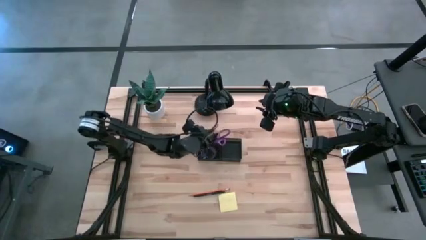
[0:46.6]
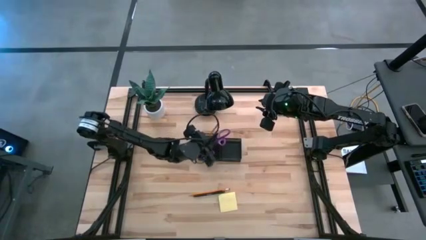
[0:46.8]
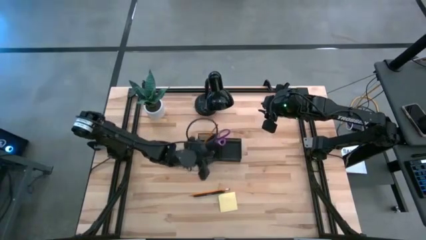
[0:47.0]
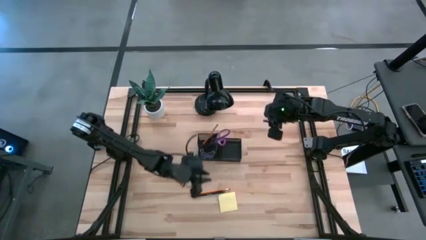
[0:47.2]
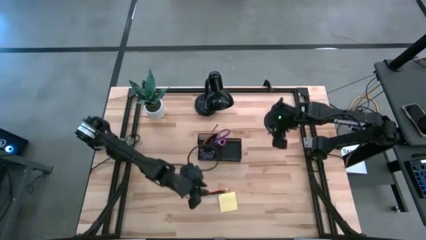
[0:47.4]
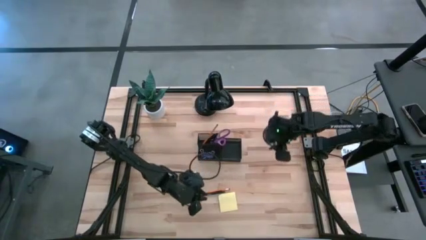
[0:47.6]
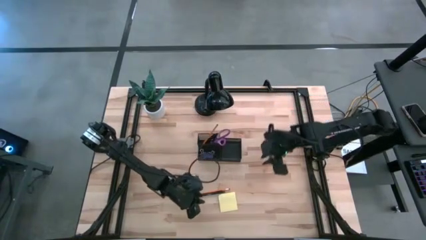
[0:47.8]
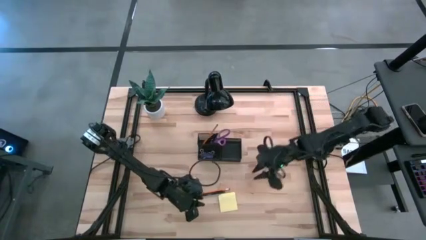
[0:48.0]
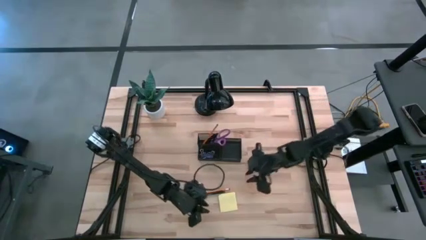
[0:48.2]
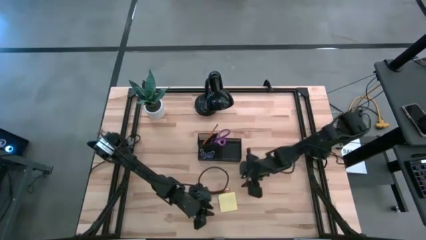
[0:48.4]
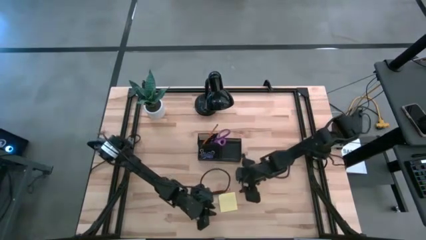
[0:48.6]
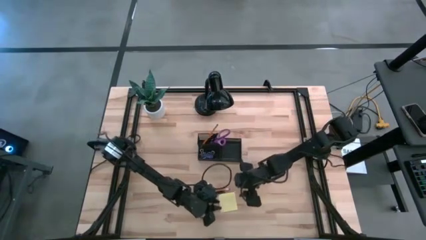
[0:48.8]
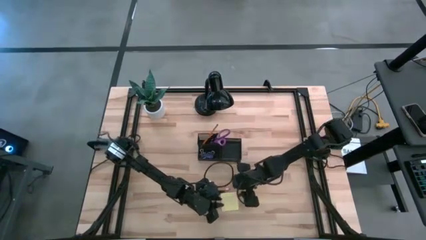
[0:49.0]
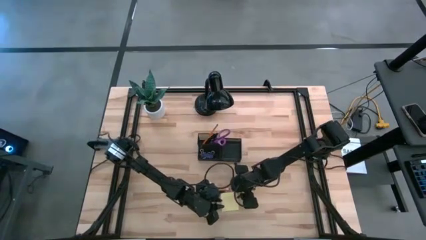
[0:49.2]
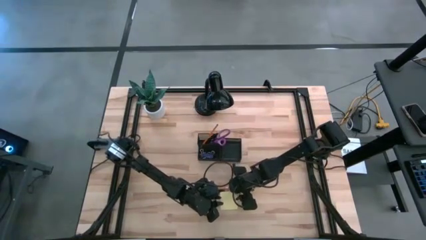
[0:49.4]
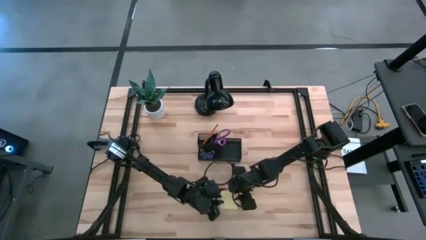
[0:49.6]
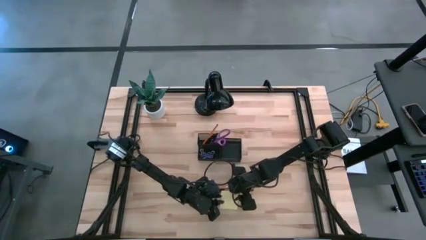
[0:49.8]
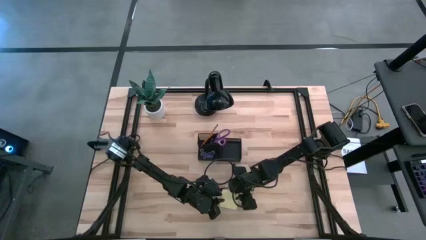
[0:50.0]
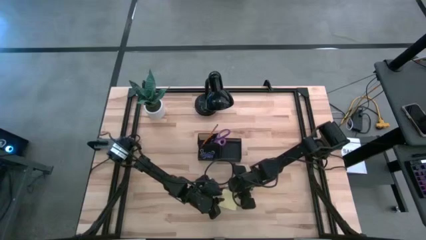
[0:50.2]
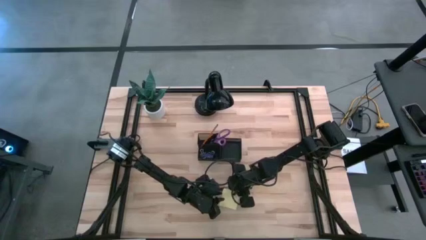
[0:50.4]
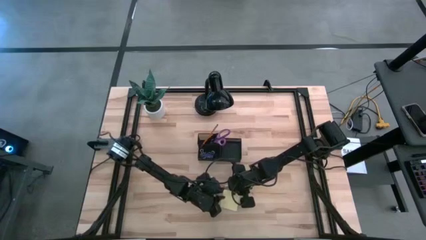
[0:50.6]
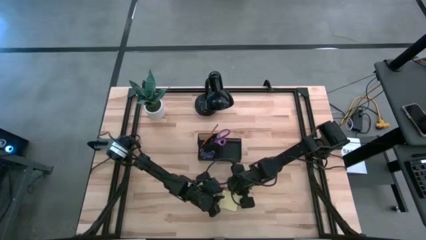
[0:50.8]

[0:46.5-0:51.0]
Task: Pick and place office supplies into organizer
Put the yellow sticky notes into the black desk organizer

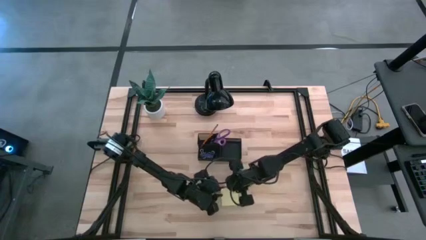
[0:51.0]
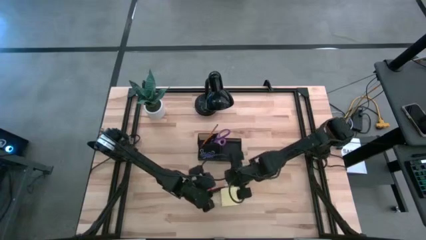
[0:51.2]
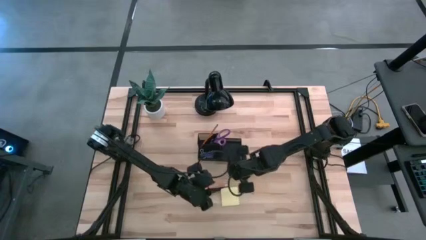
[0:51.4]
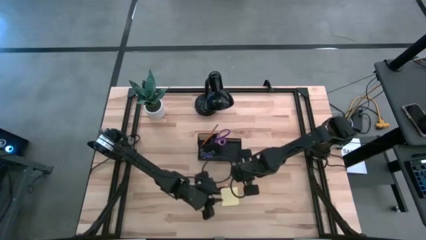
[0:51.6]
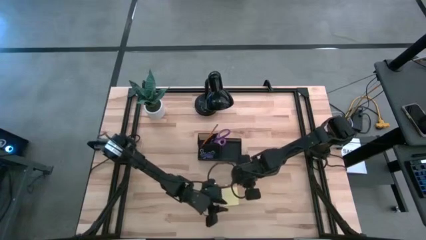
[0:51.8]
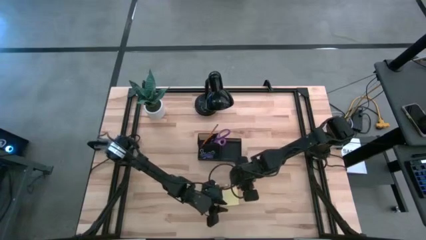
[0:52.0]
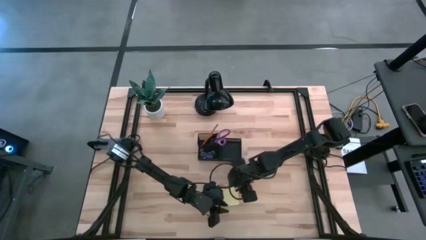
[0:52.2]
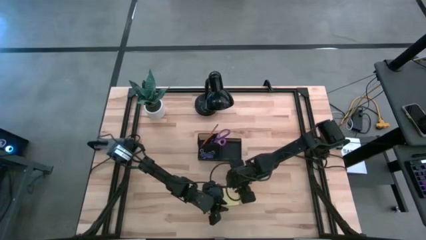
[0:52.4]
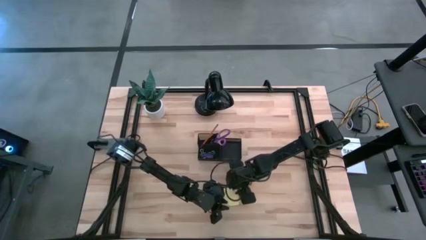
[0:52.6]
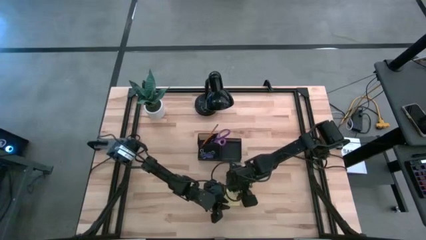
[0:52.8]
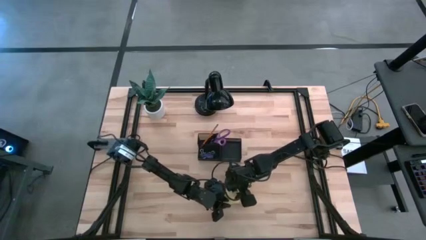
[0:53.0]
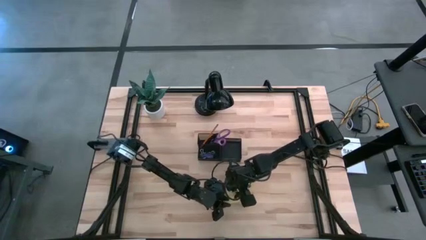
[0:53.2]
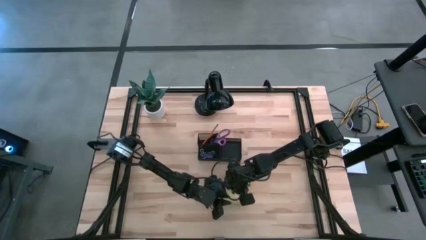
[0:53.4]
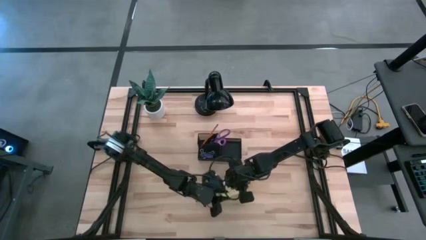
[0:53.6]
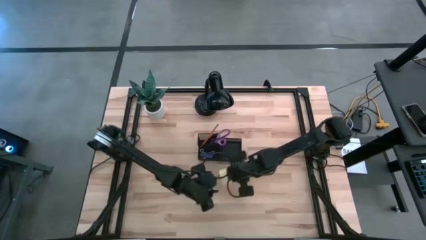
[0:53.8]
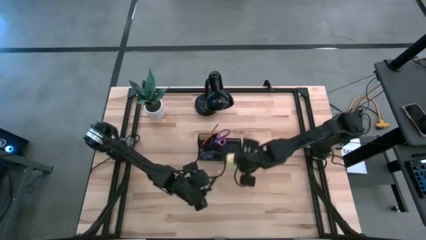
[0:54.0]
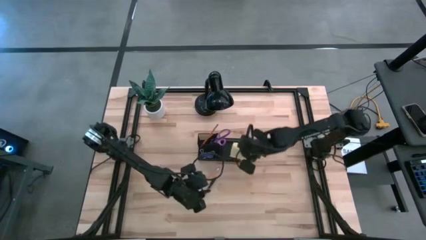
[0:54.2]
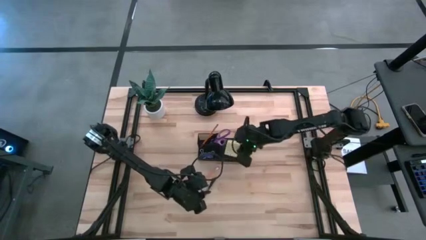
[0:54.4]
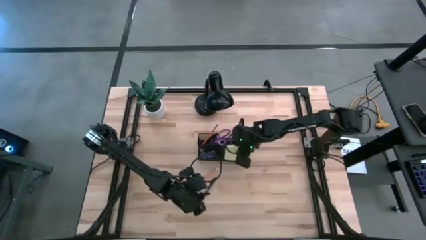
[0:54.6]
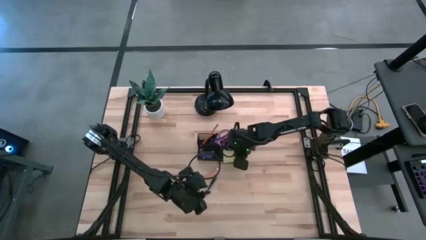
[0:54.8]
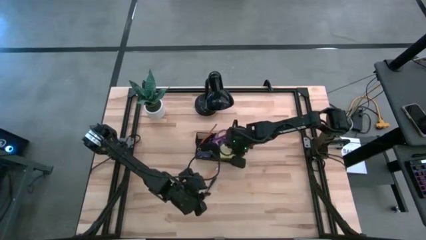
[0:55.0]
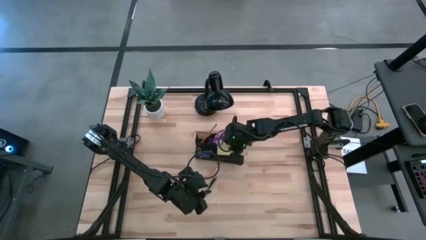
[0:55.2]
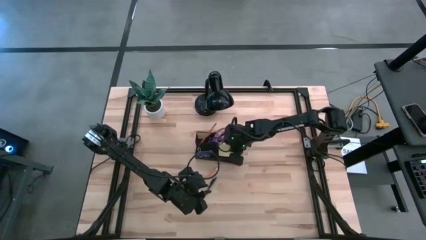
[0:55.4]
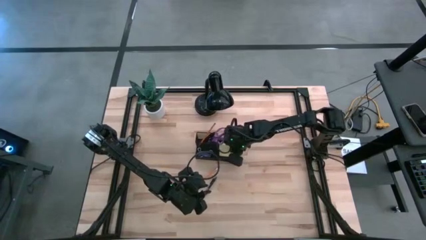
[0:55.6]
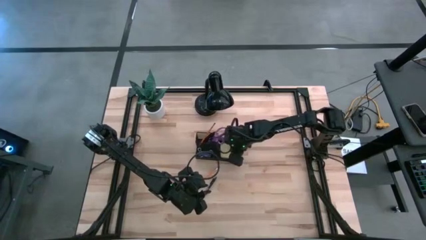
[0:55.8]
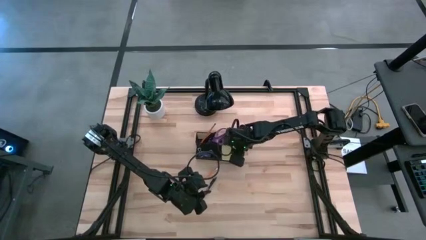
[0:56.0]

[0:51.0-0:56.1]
Put the yellow sticky notes pad into the black desk organizer

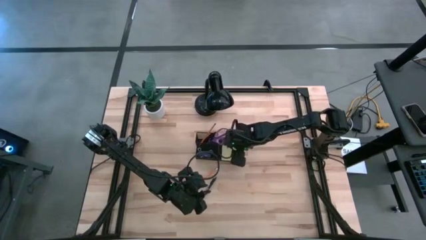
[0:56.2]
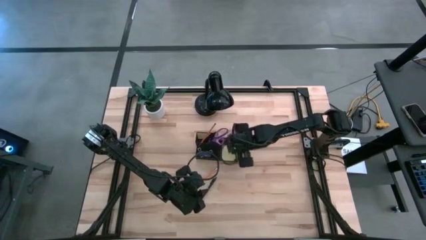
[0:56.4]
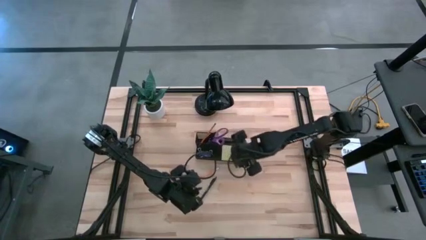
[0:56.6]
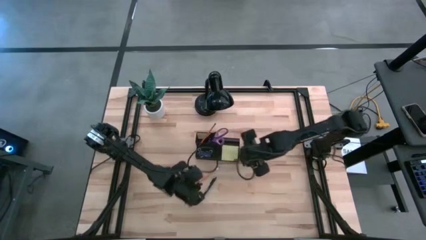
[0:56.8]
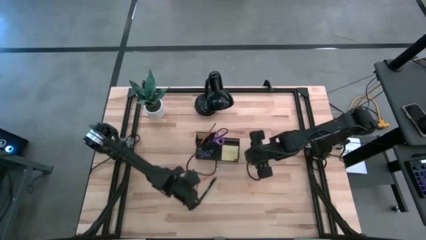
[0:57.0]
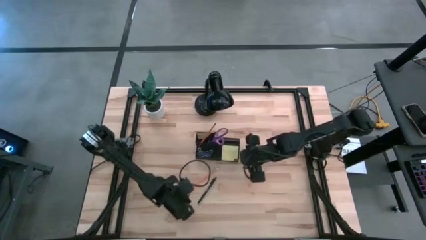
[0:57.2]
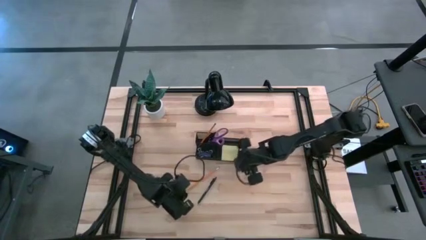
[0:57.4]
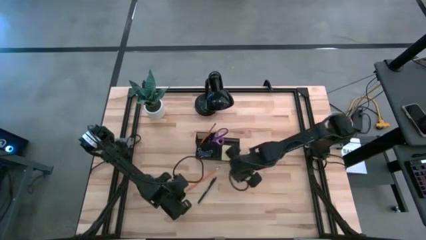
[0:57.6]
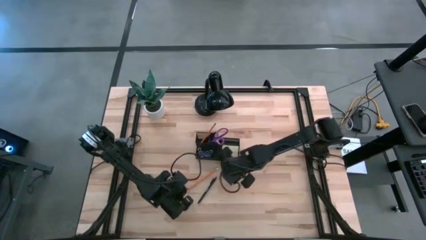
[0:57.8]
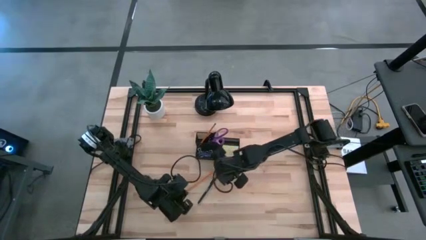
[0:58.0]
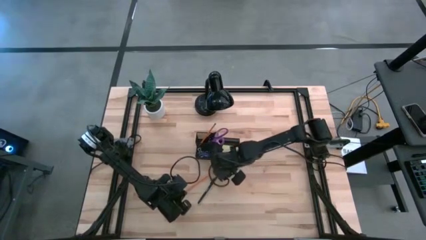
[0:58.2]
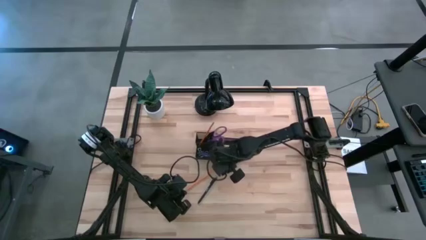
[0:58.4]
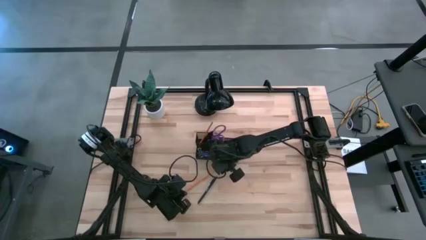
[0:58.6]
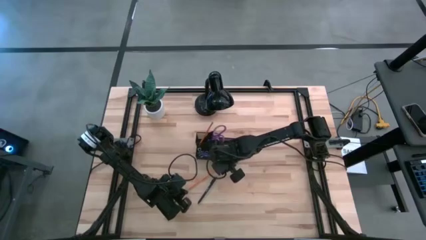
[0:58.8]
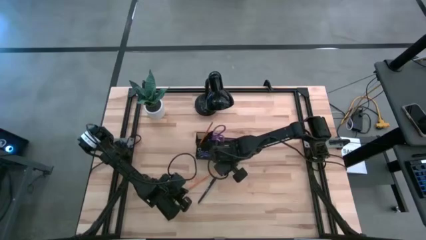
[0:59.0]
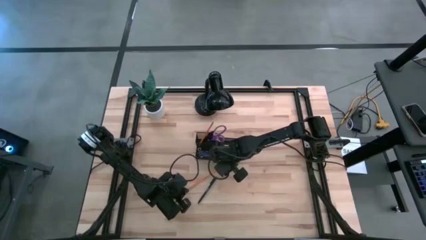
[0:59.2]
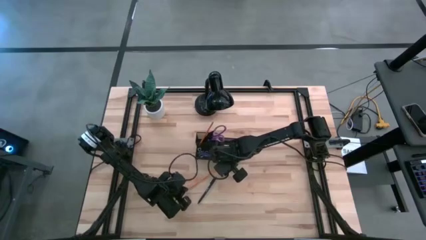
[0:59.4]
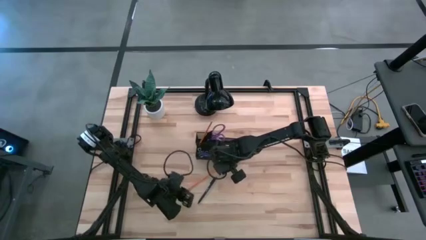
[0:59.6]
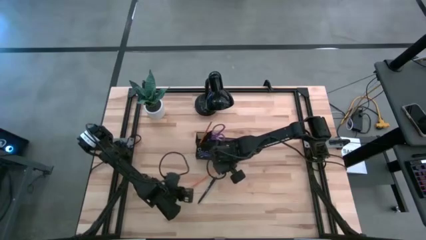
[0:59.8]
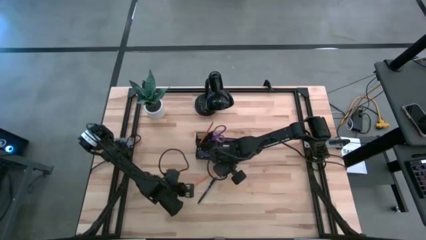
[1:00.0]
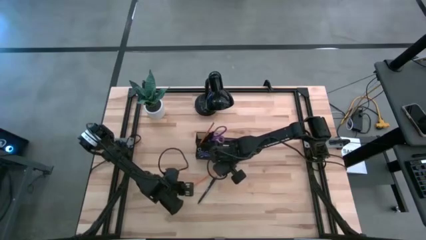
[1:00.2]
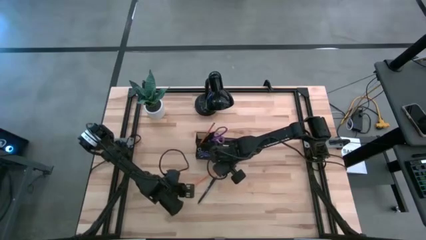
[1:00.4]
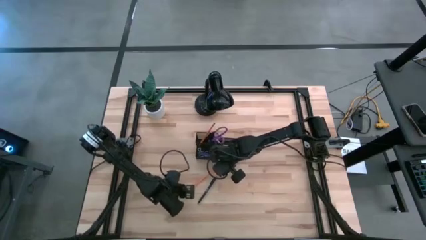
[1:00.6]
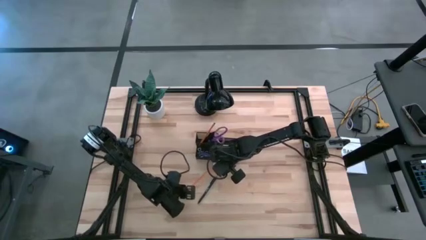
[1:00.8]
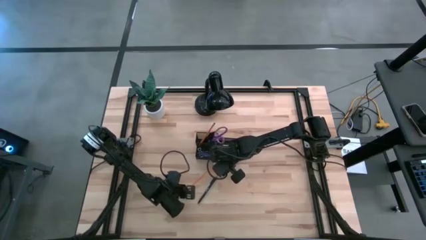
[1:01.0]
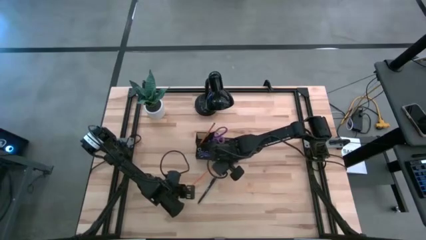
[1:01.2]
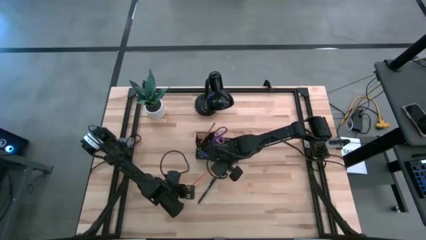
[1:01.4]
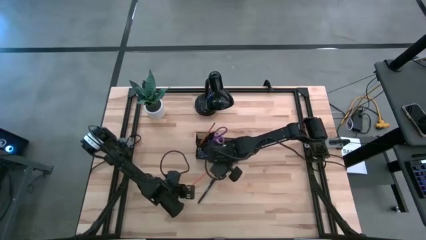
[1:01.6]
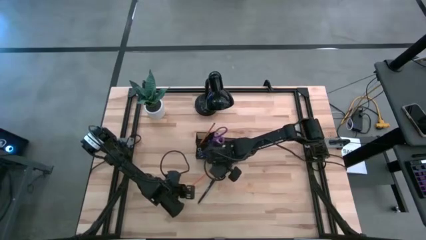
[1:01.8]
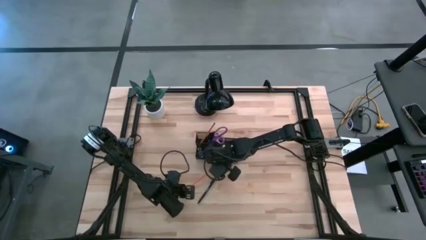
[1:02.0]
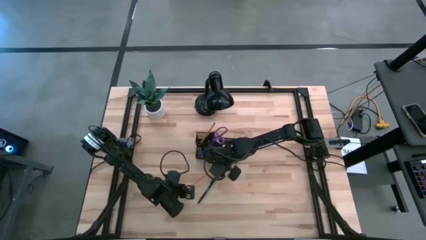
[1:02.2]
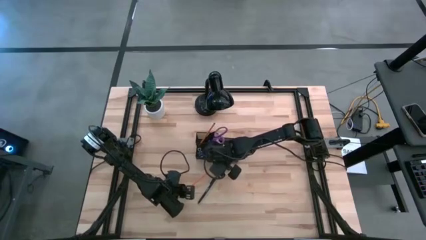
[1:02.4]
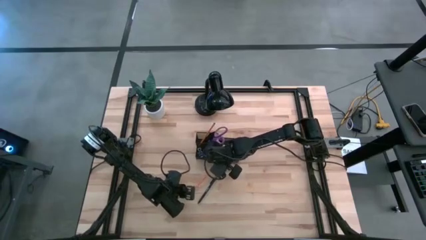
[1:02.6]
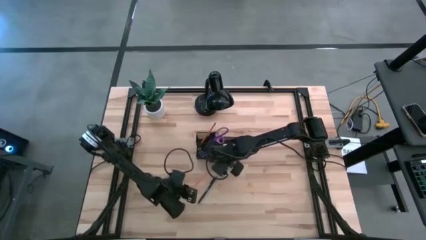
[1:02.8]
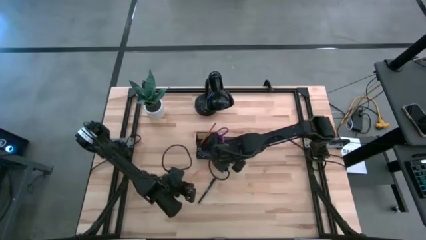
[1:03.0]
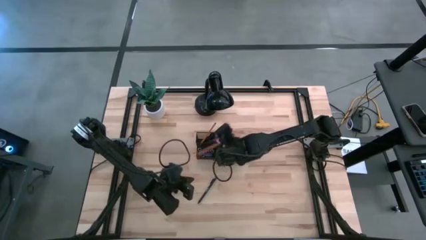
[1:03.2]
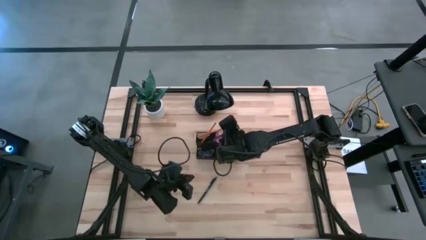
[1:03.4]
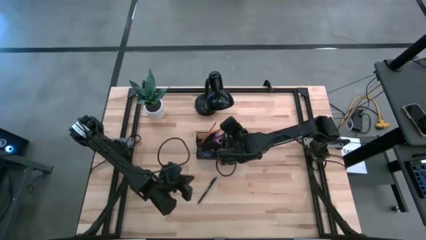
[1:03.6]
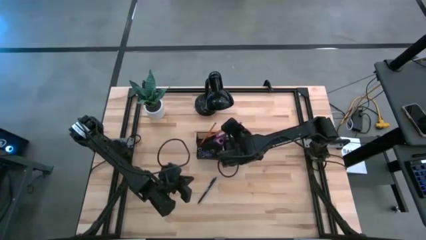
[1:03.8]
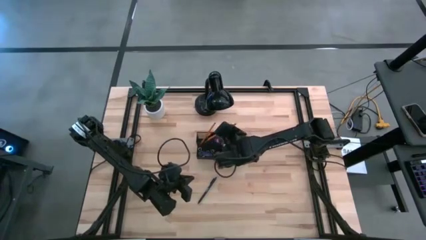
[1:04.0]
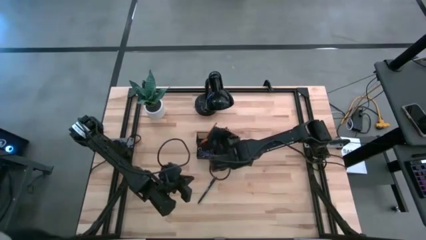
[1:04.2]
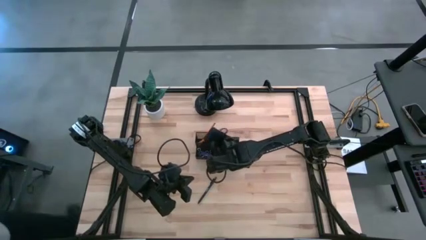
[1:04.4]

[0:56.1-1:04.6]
Put the yellow pencil into the black desk organizer
